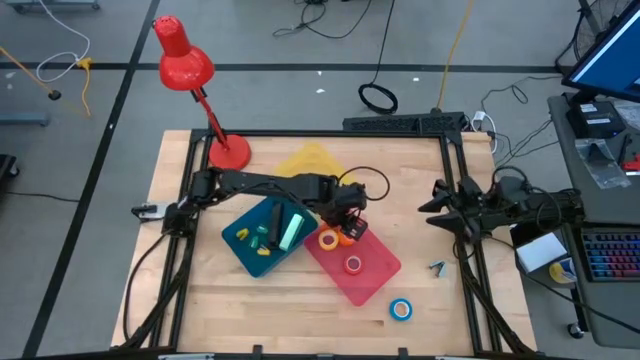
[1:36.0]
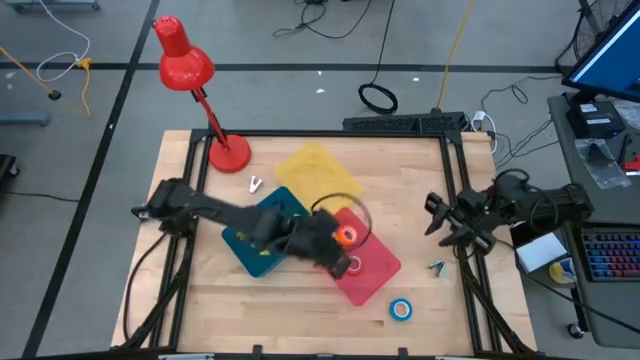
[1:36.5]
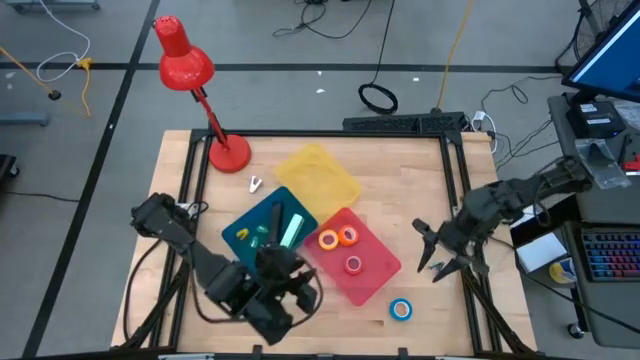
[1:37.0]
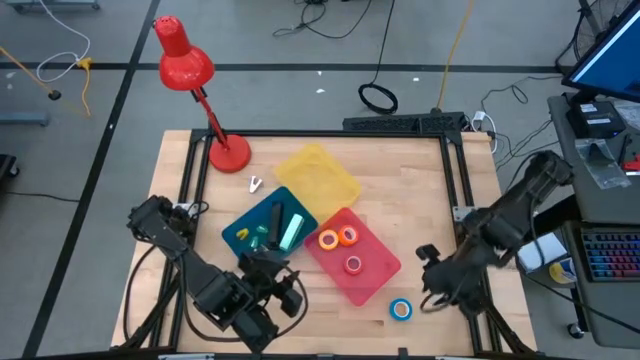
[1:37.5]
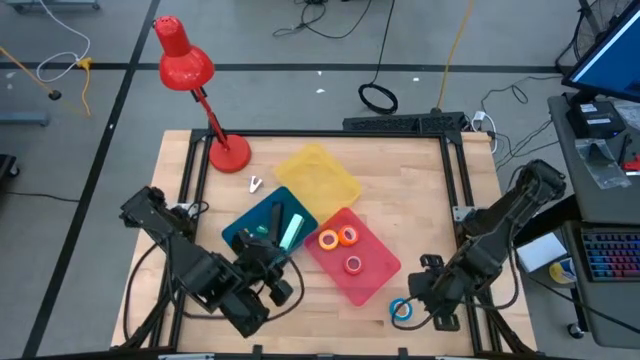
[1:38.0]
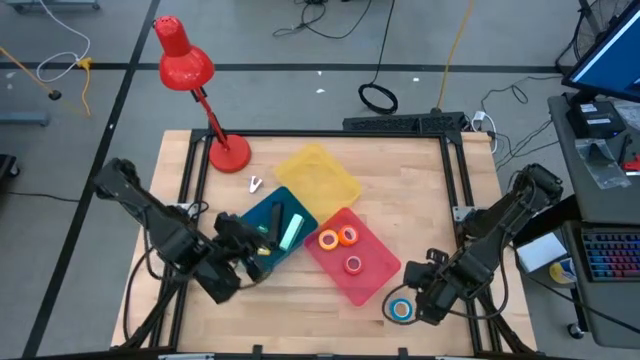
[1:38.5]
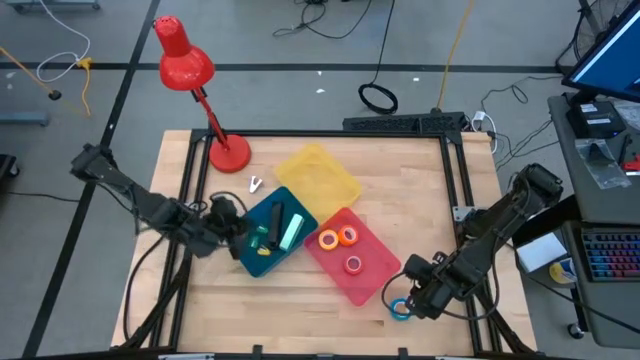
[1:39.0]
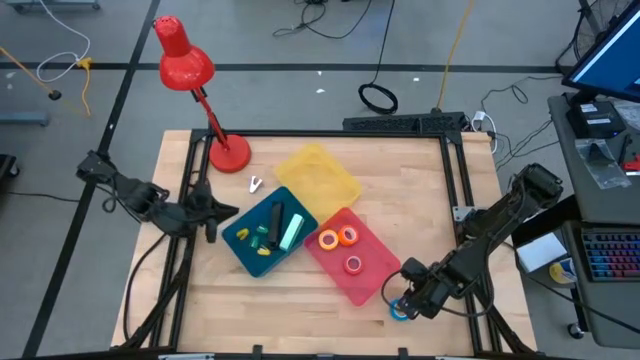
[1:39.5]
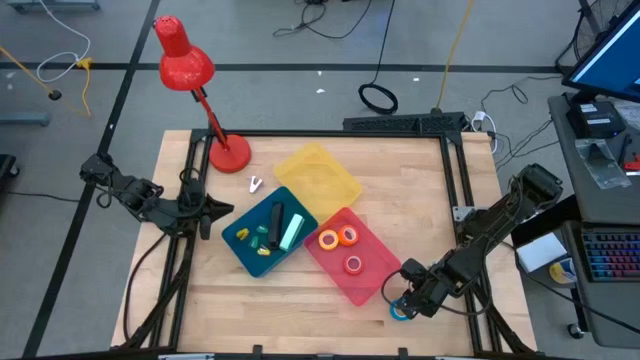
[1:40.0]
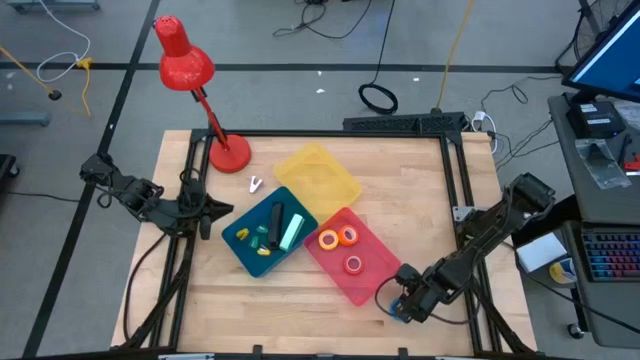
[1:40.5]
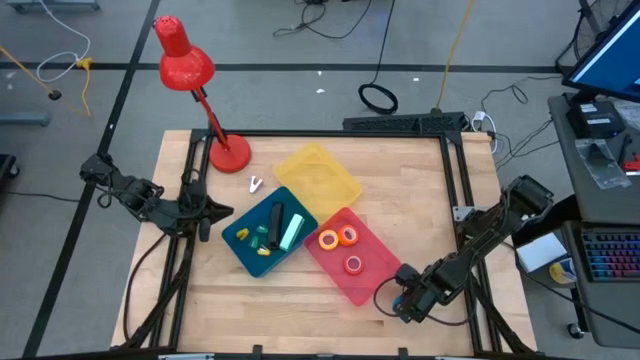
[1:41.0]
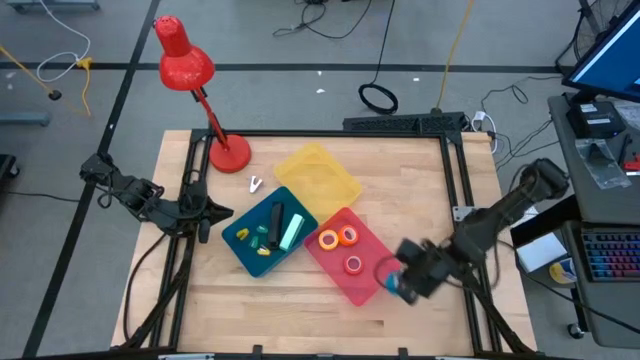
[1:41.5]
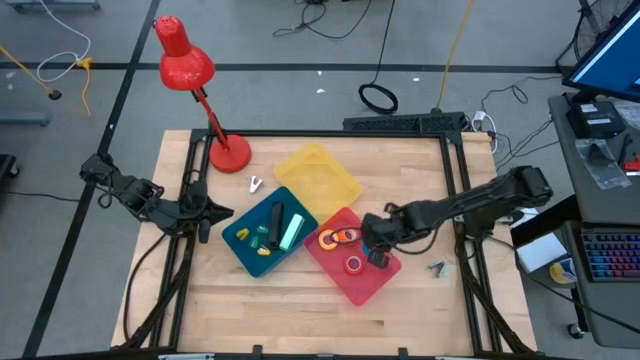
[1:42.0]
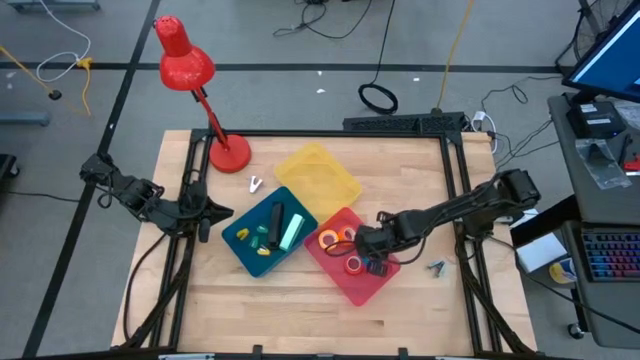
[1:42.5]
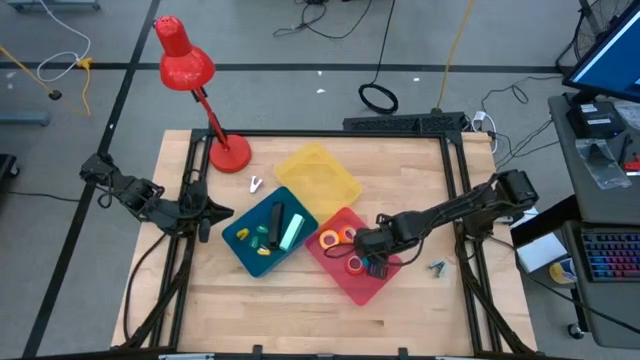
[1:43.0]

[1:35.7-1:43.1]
Task: Pick and place Stapler, Stapler remover, tape
Put the blue tape into the red bin

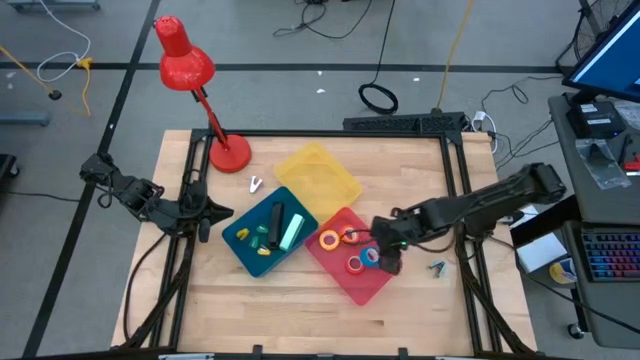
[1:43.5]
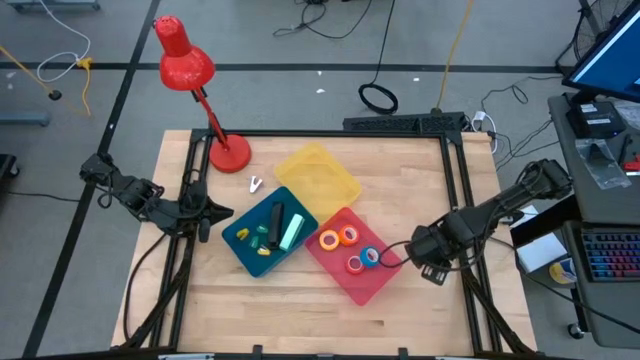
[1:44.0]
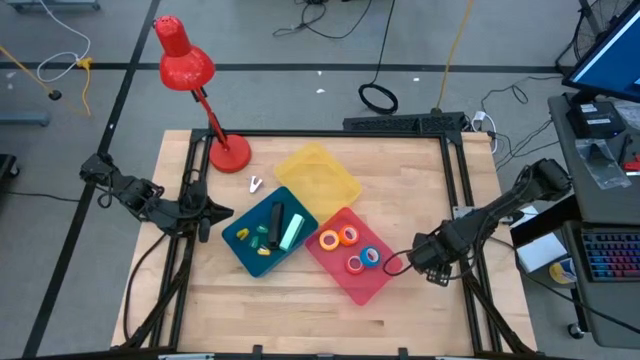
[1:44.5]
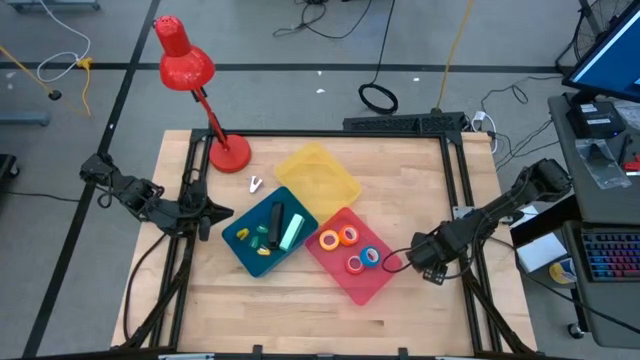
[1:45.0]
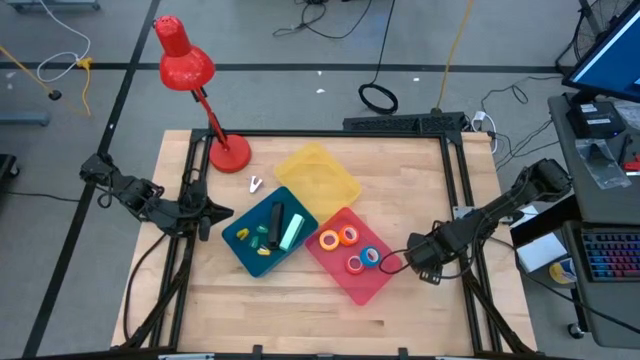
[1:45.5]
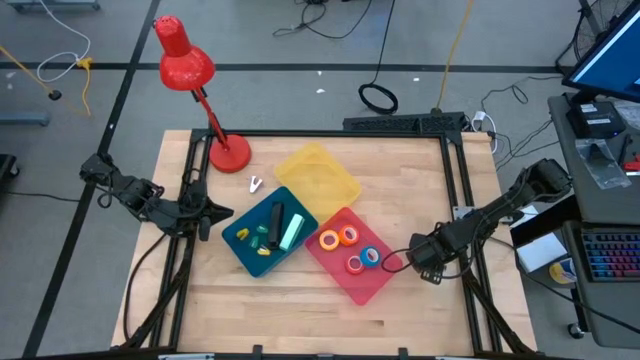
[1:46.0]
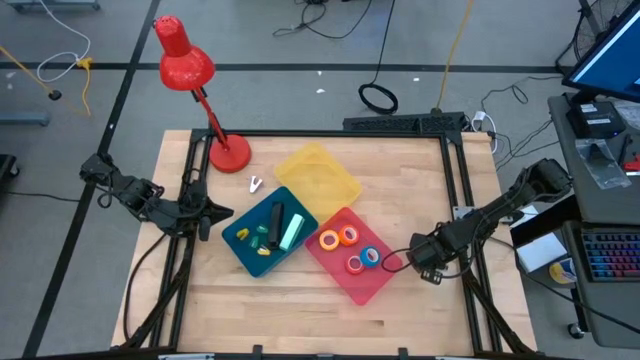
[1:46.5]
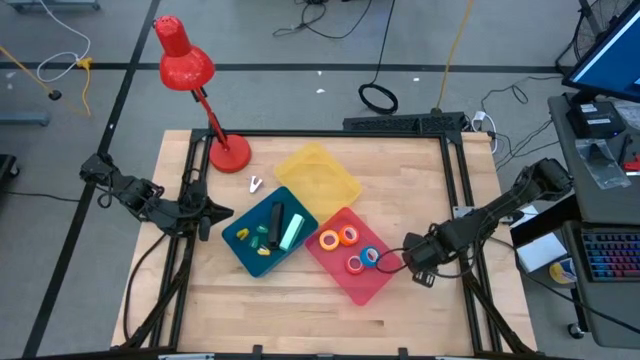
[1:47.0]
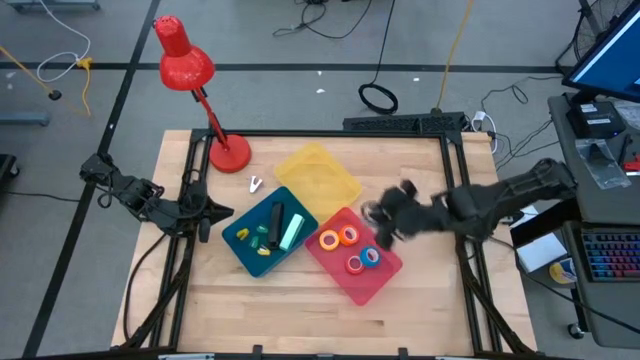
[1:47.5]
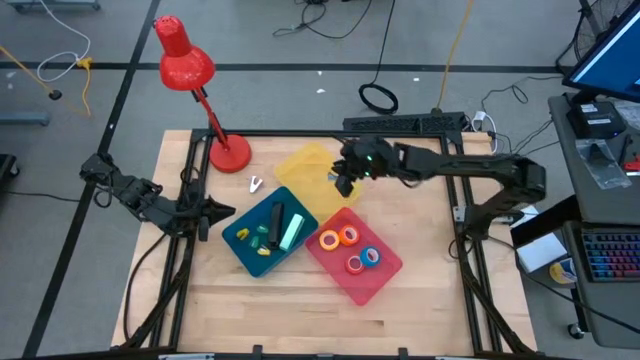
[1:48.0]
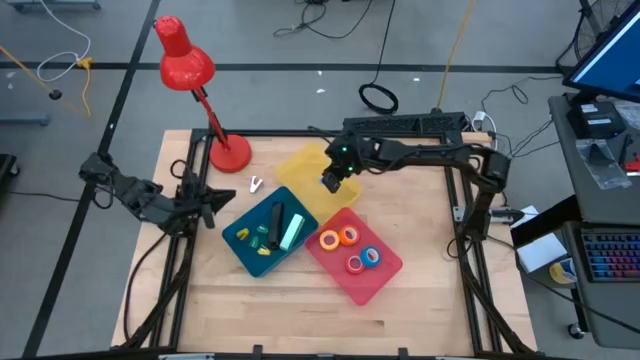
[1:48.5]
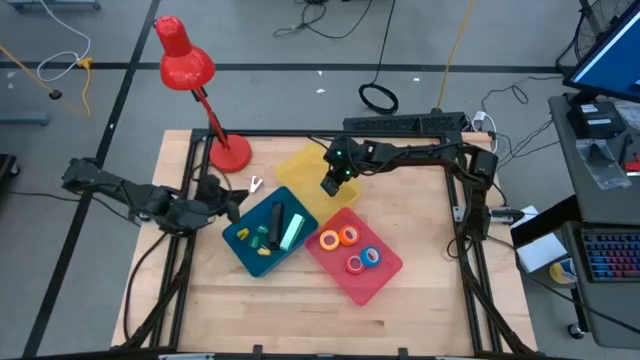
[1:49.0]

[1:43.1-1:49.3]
Put the light blue staple remover into the yellow bin

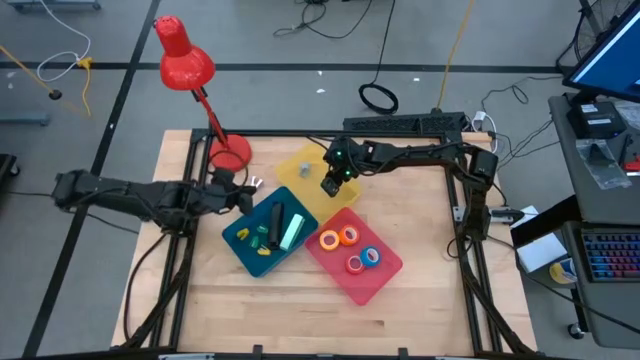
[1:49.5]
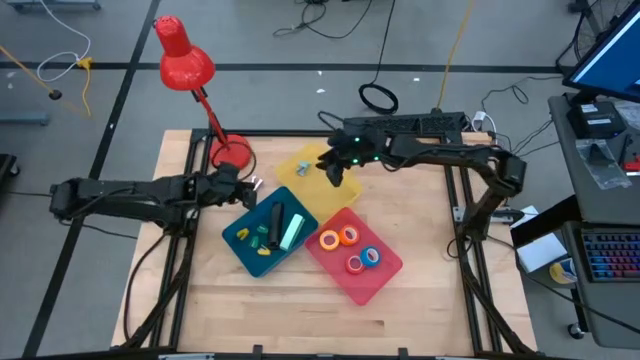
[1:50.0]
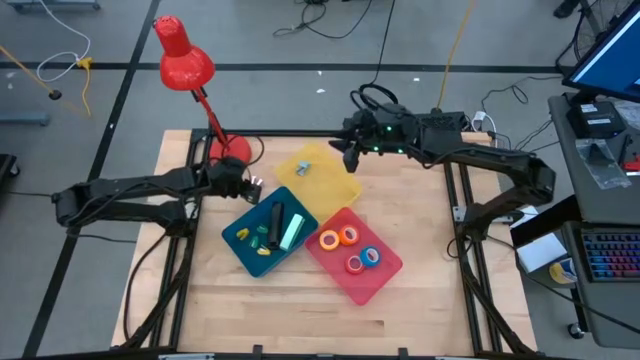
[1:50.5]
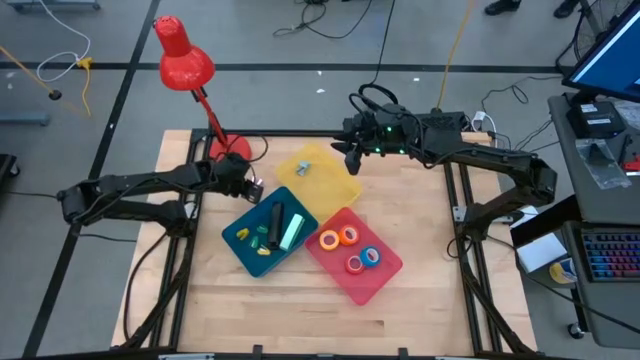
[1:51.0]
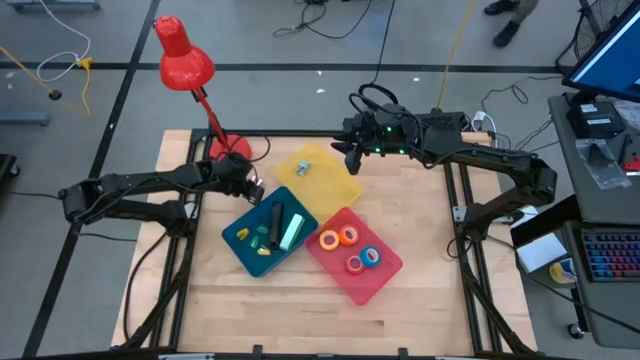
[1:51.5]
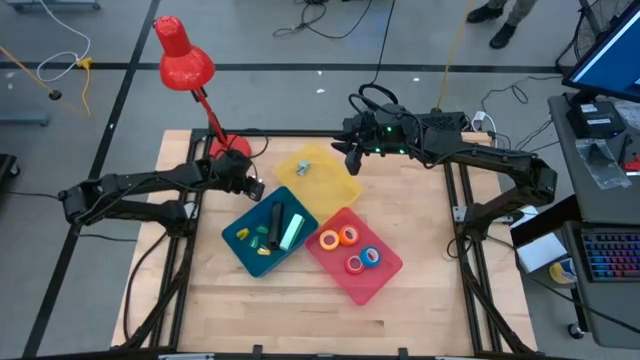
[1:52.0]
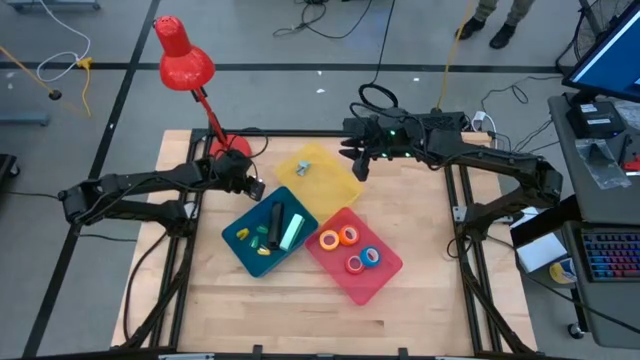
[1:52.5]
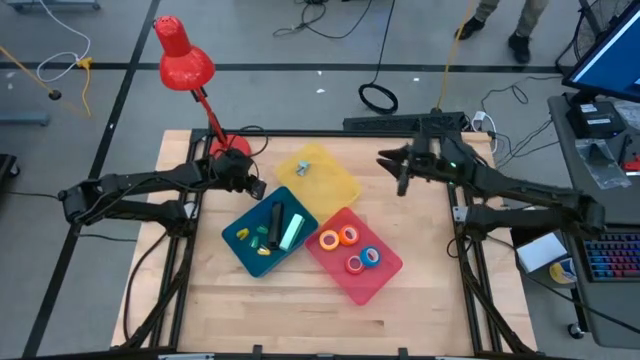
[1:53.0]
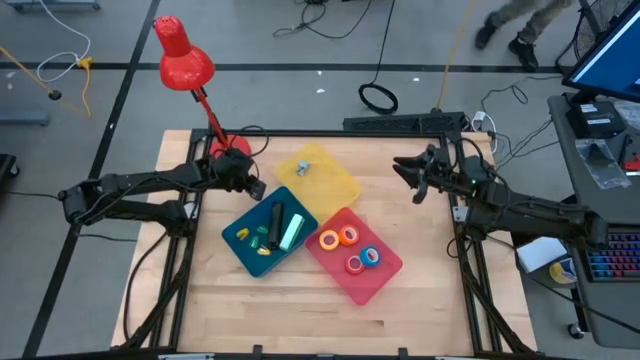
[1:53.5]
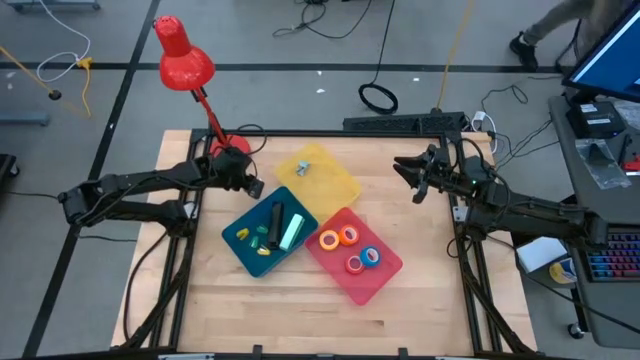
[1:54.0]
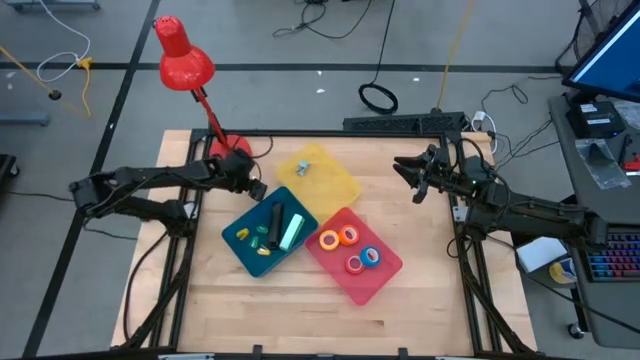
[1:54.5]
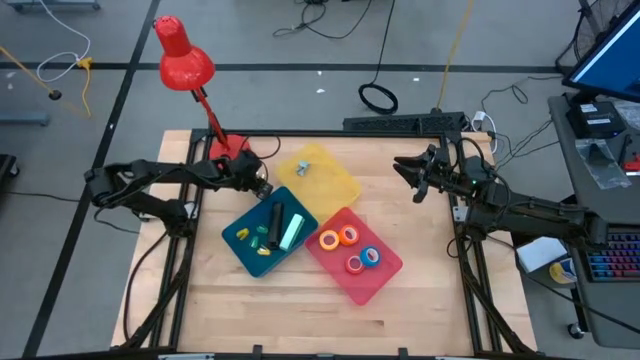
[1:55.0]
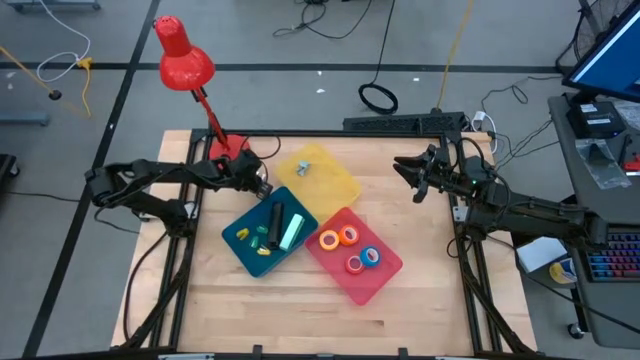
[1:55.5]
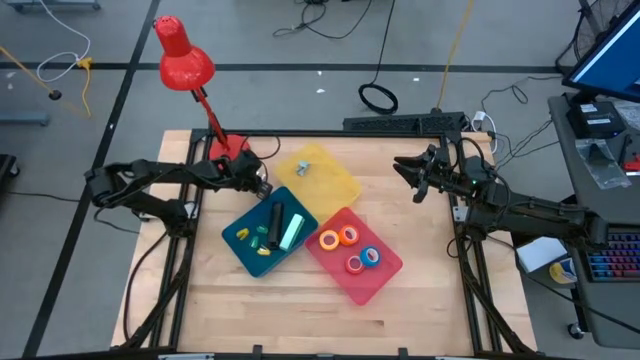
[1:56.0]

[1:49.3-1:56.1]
Put the violet staple remover into the yellow bin

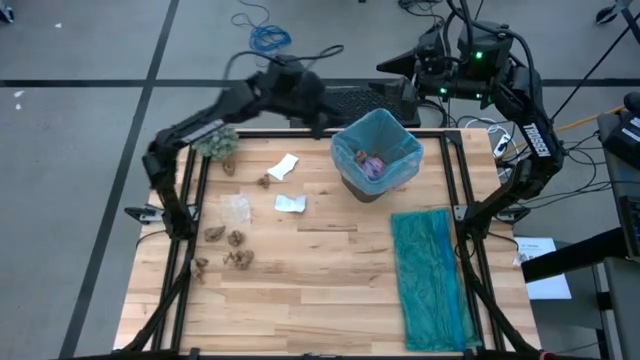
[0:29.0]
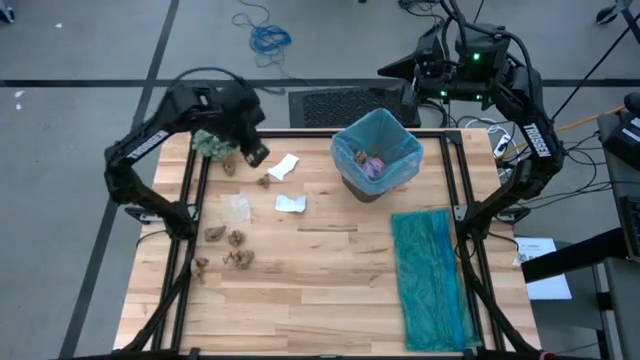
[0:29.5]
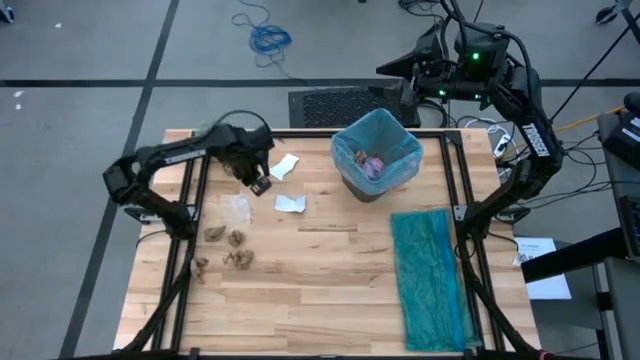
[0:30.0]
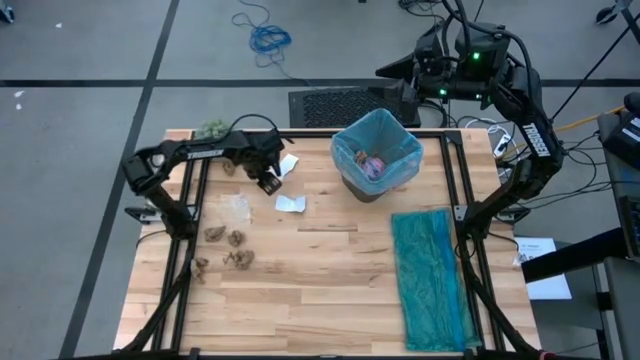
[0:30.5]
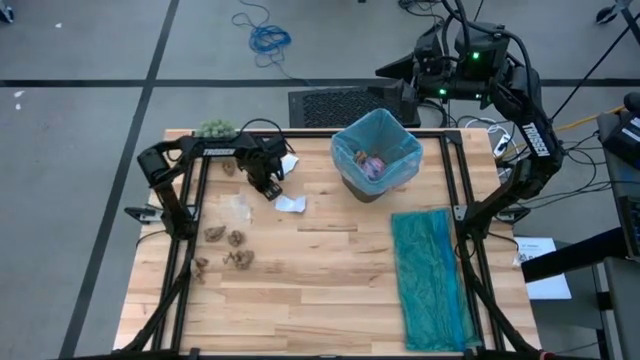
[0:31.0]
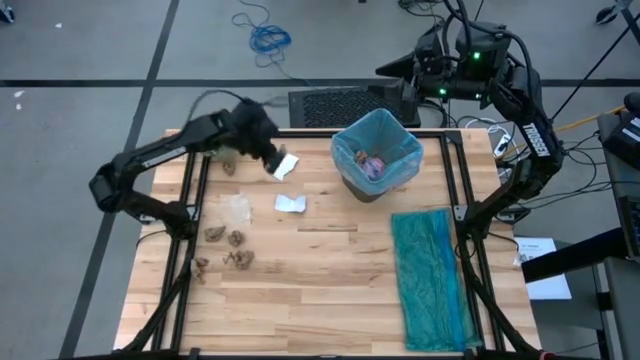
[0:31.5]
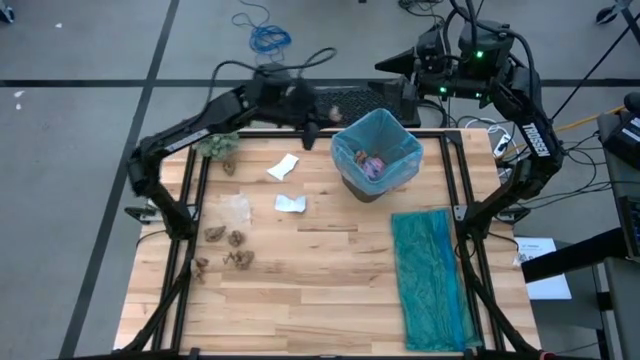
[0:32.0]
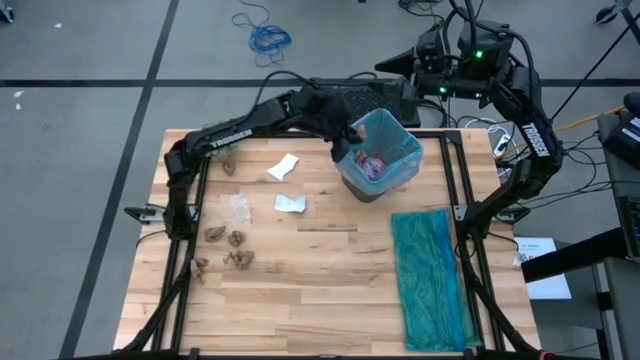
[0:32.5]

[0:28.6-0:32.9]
Task: place trash/remove bag and relplace
Put the brown paper into the trash bin
